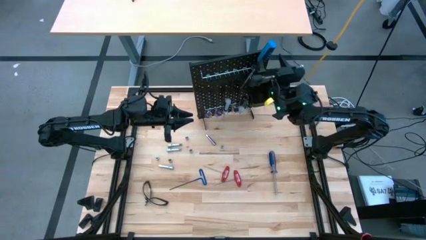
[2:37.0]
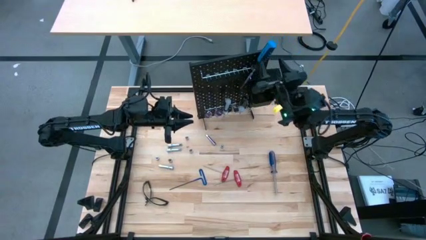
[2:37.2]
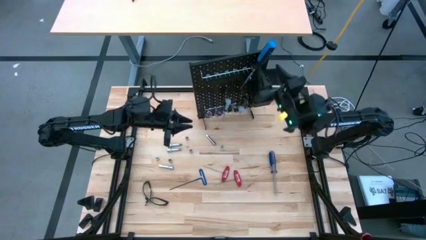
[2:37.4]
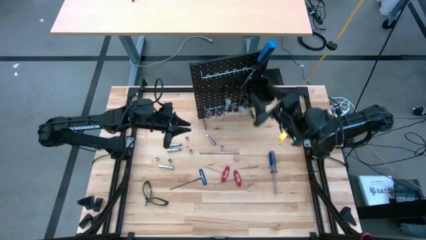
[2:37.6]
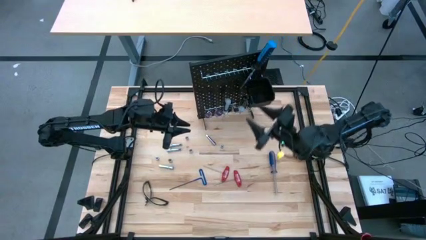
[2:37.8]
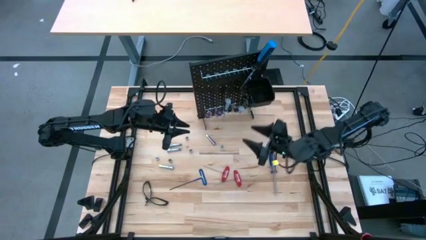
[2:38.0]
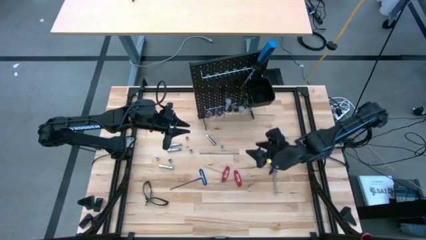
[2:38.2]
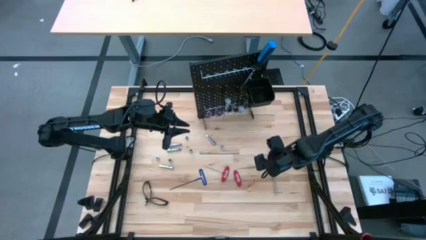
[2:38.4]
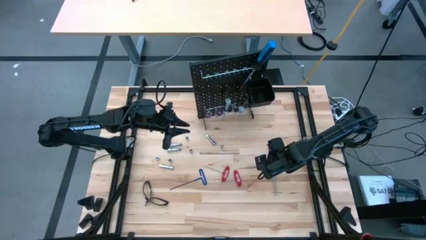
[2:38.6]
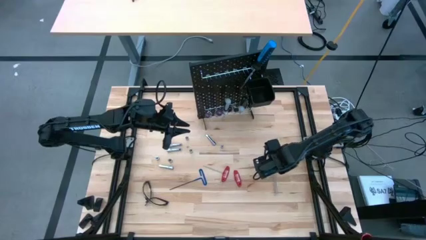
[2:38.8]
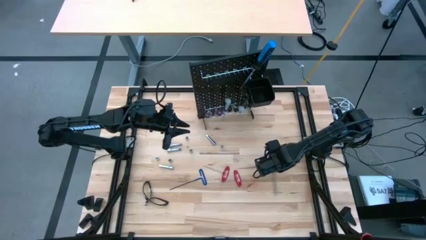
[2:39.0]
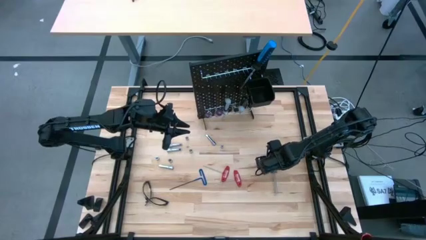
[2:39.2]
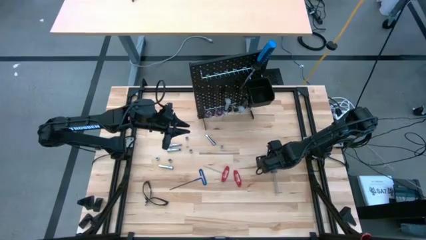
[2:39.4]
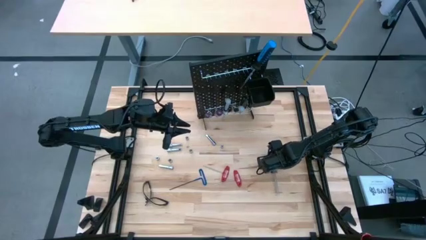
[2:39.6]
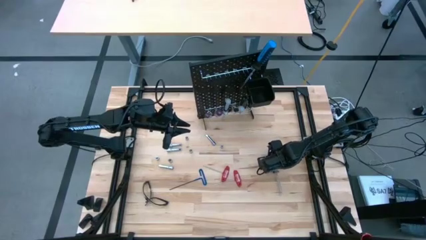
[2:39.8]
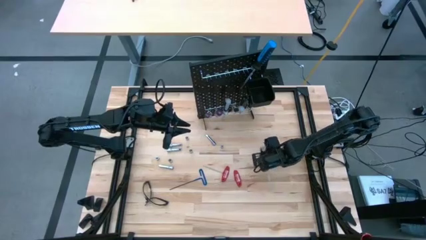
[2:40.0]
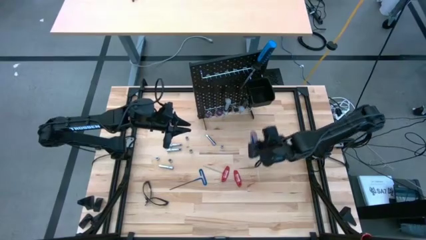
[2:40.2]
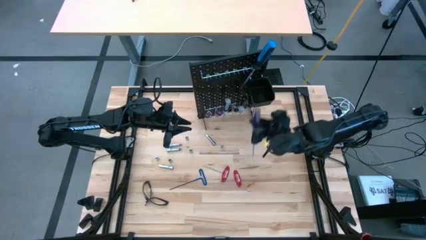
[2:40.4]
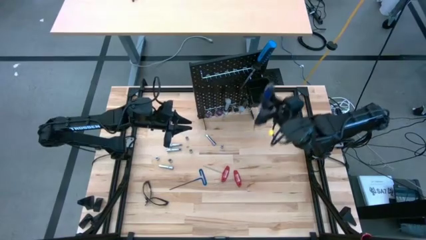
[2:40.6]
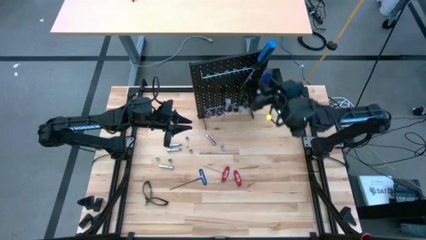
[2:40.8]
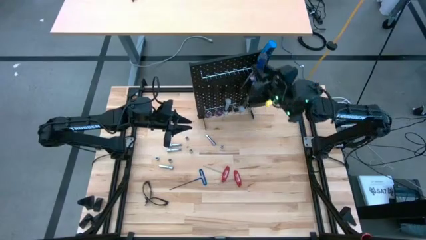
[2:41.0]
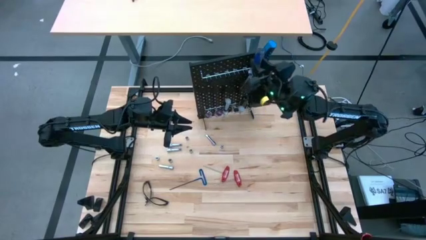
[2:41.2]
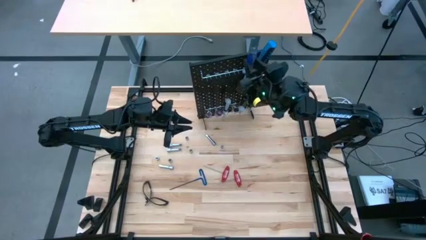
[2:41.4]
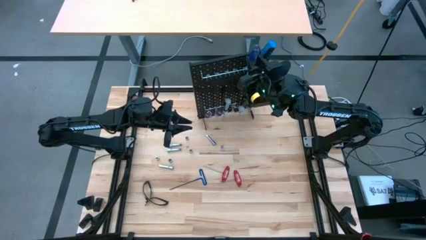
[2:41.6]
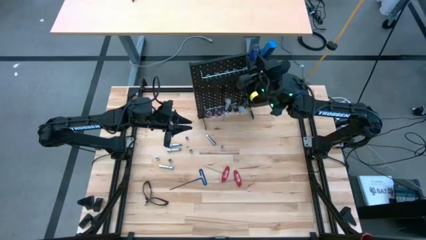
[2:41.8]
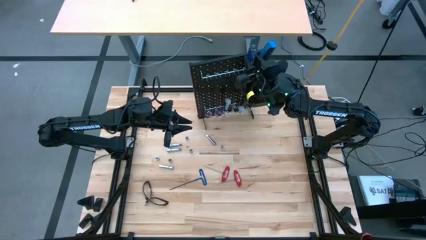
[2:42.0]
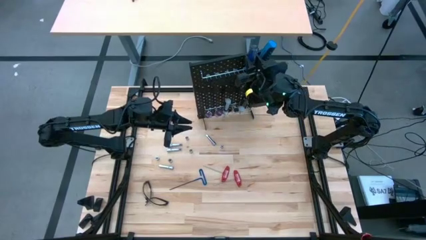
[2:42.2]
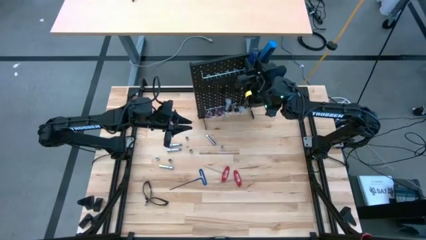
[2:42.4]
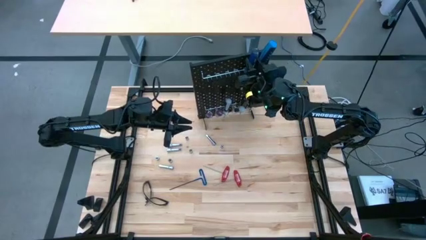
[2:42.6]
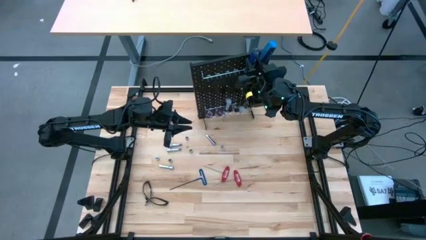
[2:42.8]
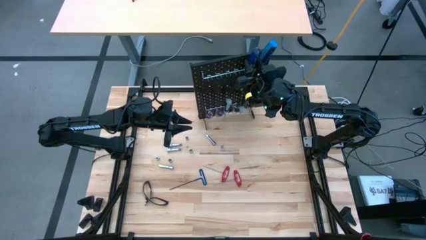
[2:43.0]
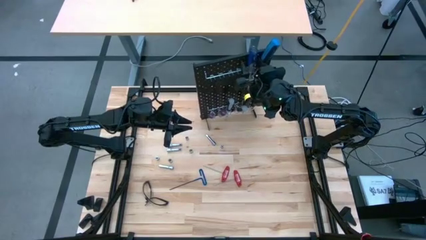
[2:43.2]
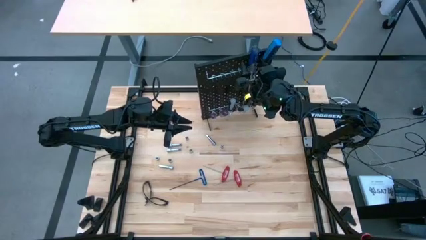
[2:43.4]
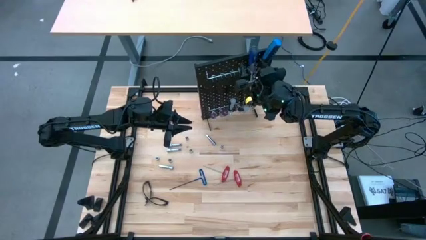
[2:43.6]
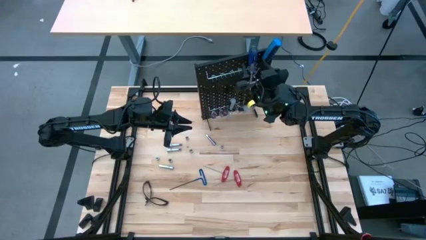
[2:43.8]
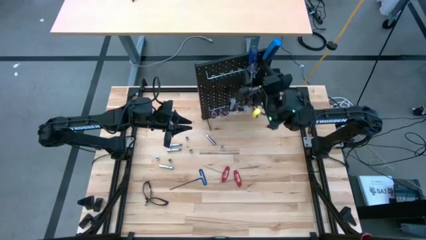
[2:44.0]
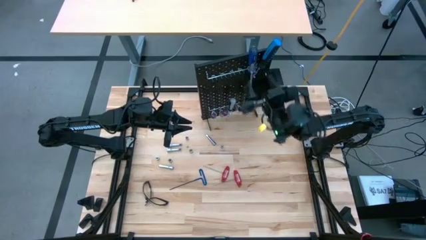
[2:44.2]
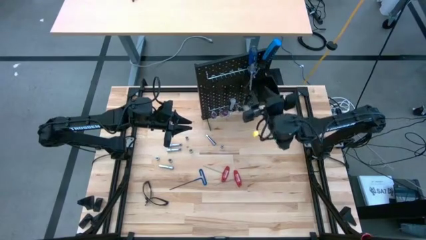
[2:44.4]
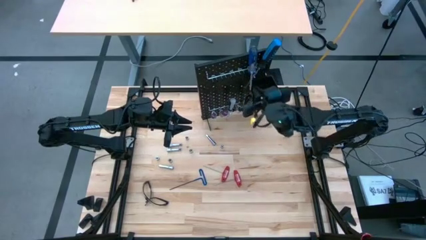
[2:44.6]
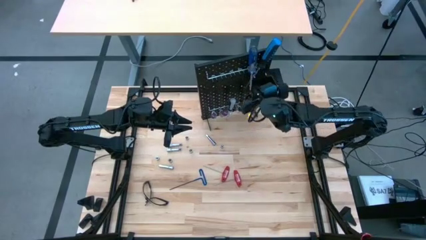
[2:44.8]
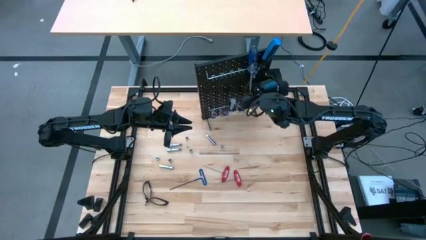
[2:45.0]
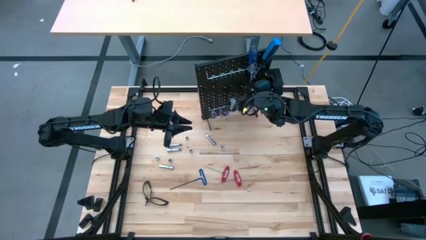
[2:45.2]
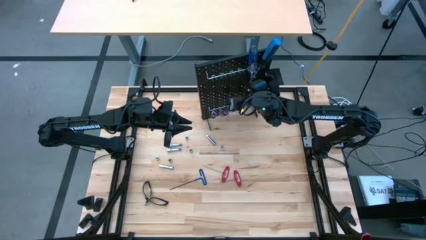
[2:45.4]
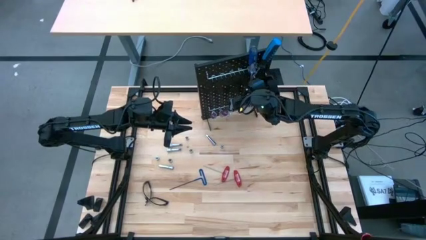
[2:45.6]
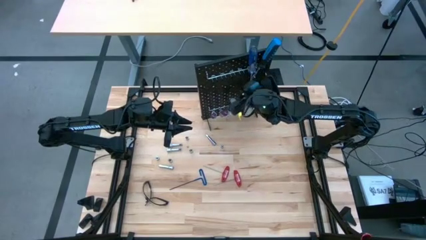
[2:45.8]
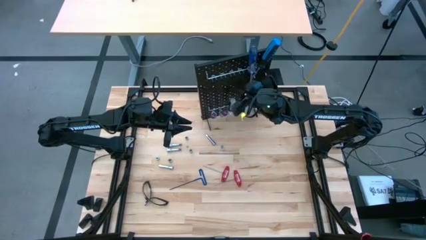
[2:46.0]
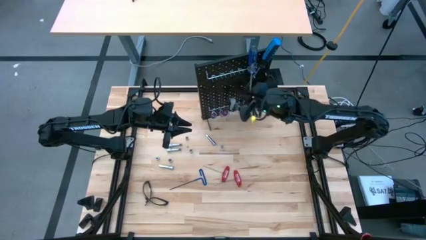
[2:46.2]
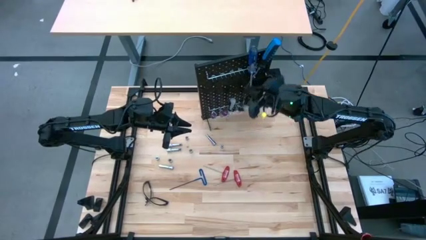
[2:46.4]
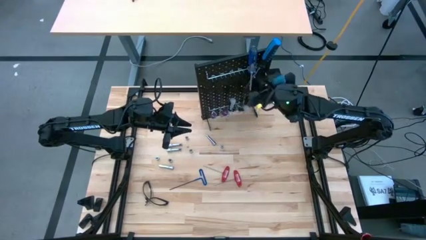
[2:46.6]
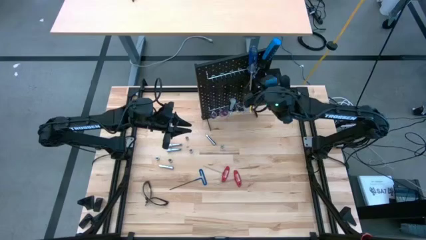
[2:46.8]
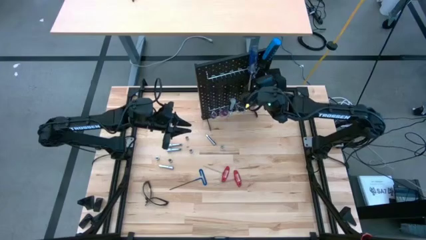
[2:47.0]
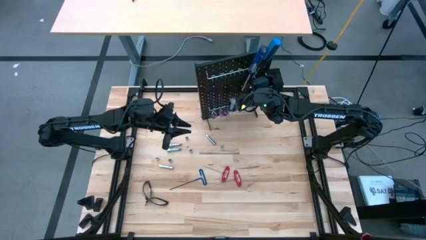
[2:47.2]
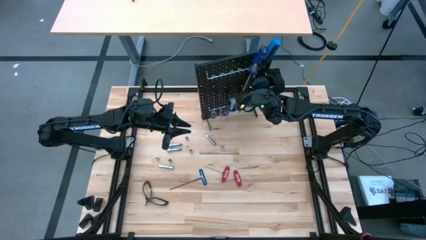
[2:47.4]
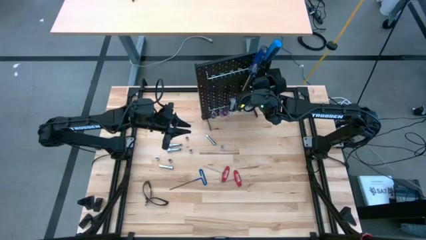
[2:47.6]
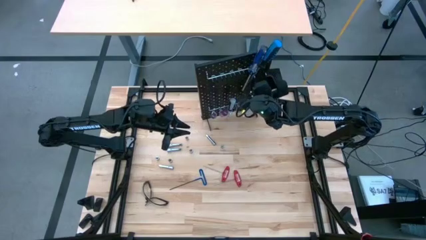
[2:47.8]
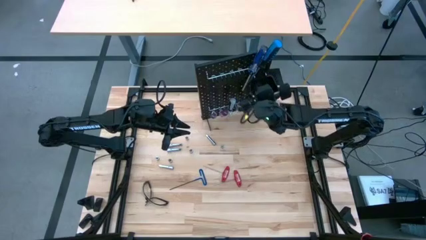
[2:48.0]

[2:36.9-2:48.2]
Task: Hang tools onto peg board
Hang the blue screwdriver on the pegboard

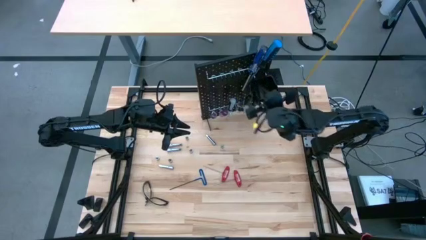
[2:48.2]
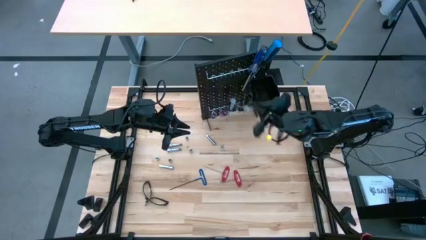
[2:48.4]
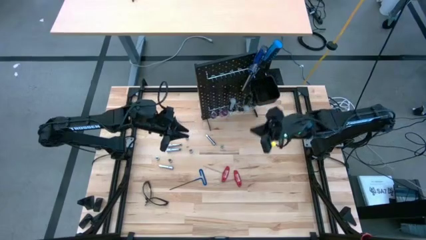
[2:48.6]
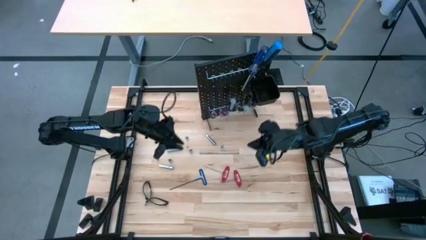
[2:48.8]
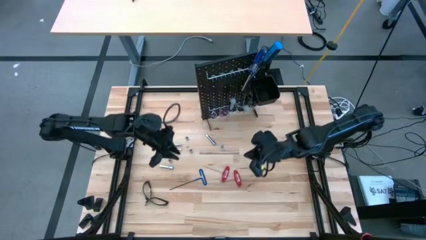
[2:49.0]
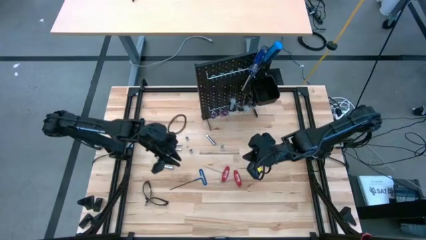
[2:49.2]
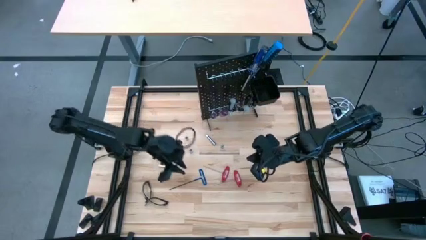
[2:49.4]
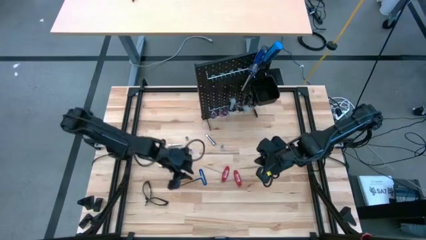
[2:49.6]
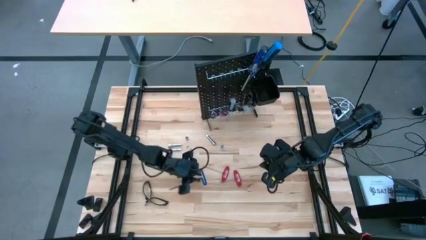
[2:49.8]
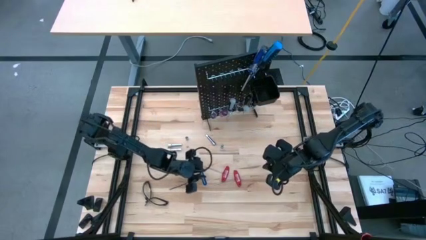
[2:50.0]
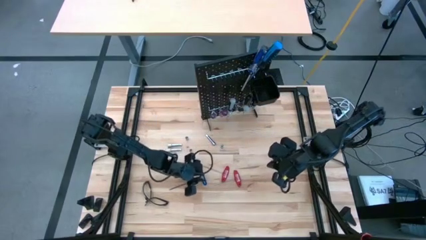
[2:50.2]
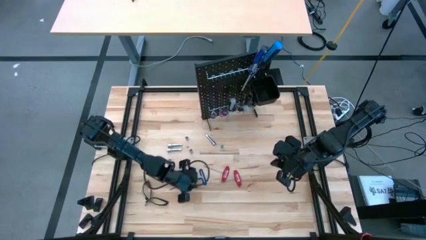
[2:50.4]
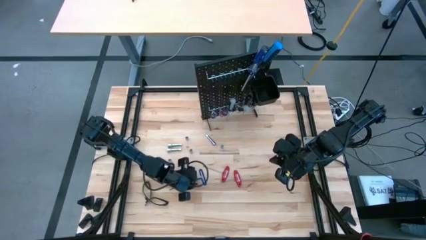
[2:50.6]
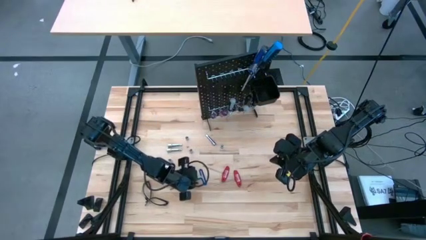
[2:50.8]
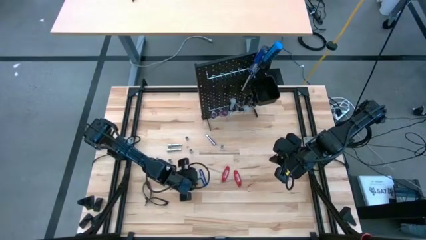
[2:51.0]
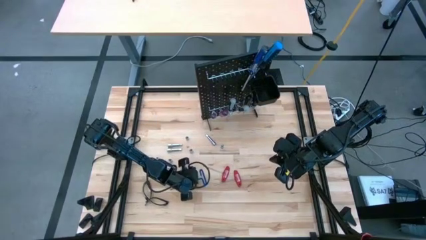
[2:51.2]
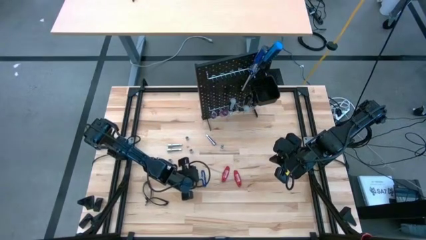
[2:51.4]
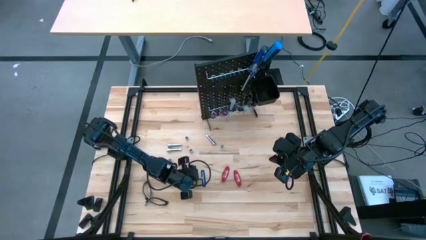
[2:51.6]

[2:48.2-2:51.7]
Hang the blue pick tool on the pegboard

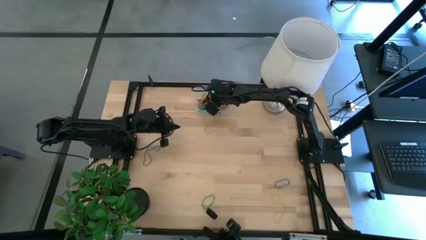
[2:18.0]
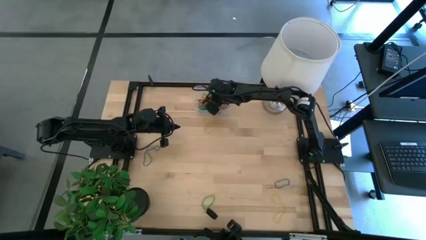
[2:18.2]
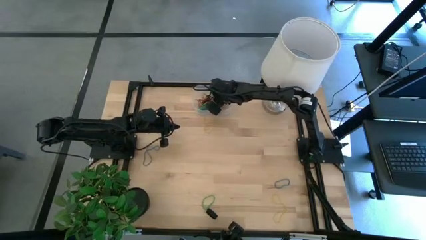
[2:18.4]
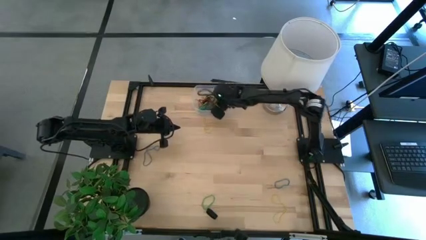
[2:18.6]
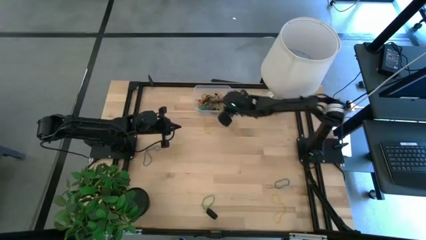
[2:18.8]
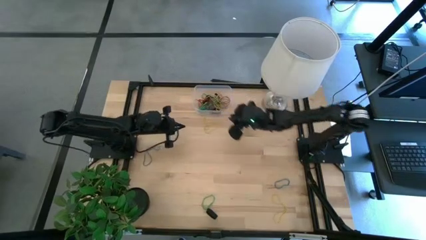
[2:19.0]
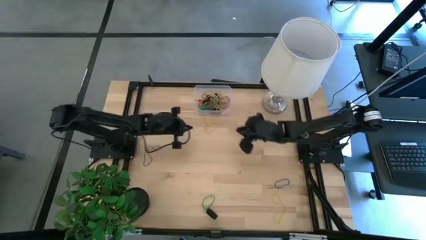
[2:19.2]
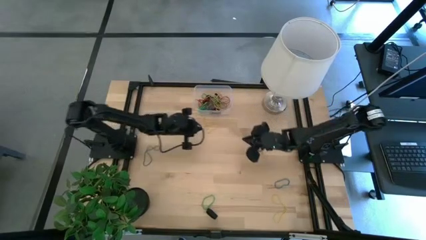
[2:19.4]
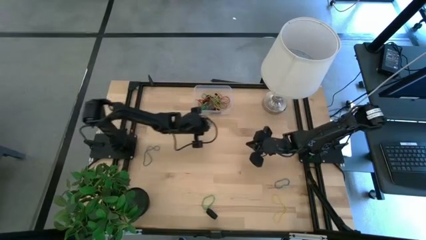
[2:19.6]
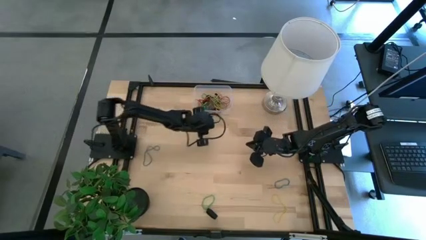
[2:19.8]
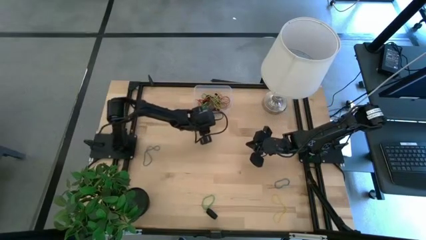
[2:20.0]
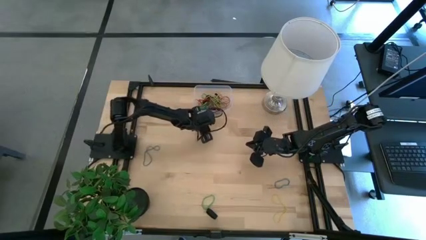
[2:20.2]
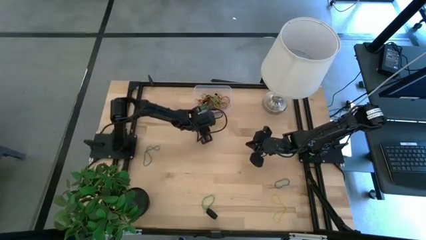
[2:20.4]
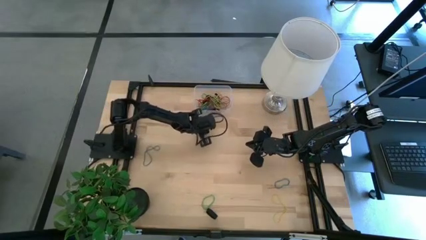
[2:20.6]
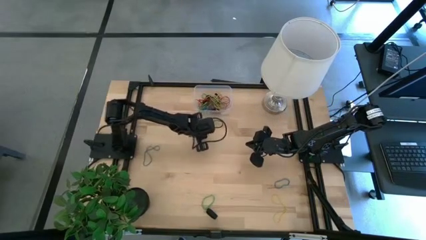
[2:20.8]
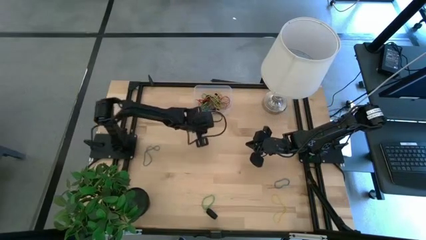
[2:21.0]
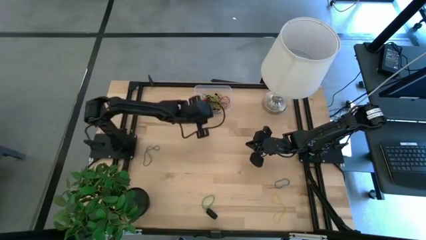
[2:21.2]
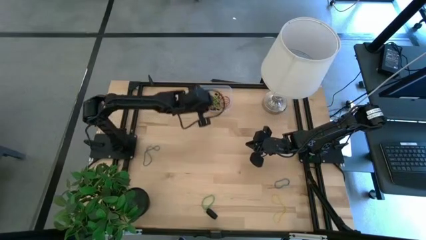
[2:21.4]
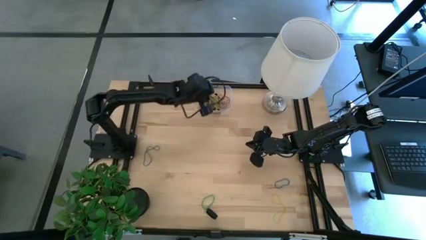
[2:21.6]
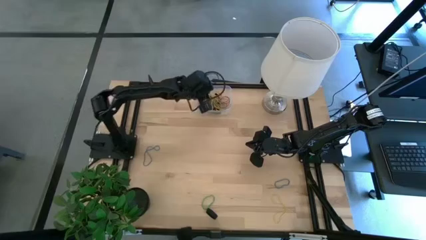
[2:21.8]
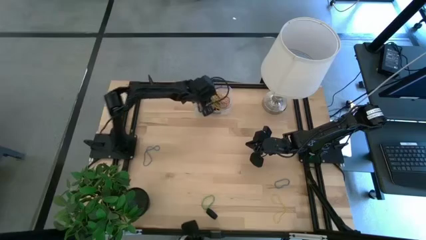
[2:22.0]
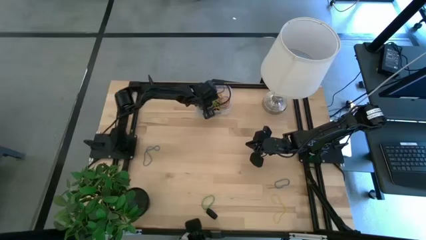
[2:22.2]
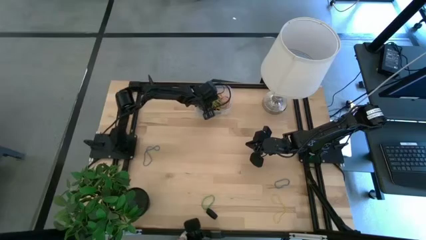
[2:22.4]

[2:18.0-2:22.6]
Task: Pick and place rubber bands into bin
Put the yellow rubber band into the transparent bin
